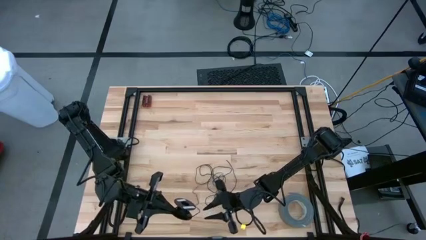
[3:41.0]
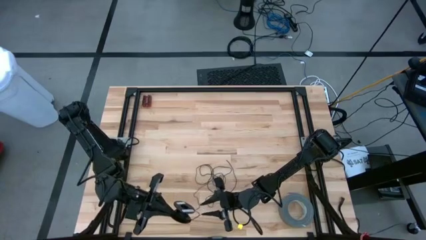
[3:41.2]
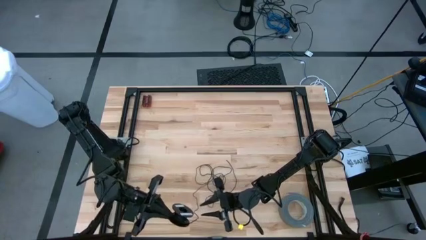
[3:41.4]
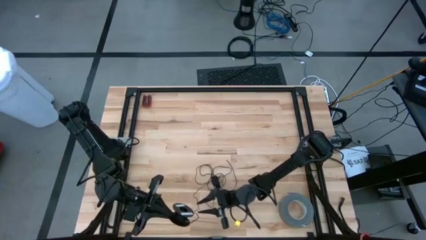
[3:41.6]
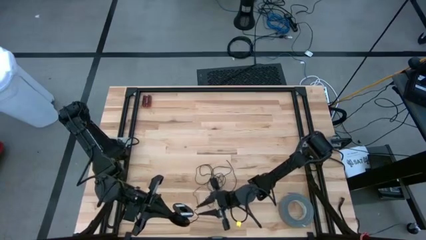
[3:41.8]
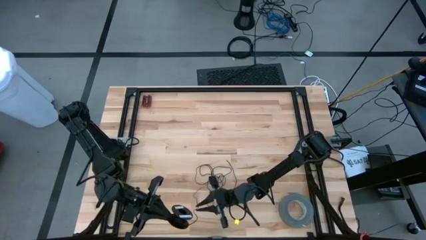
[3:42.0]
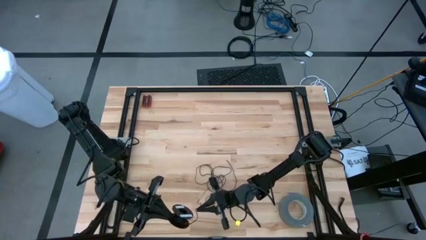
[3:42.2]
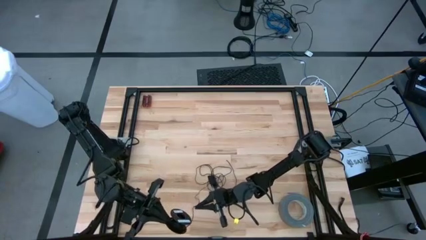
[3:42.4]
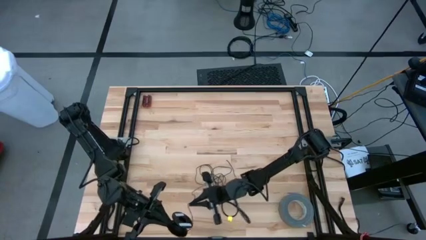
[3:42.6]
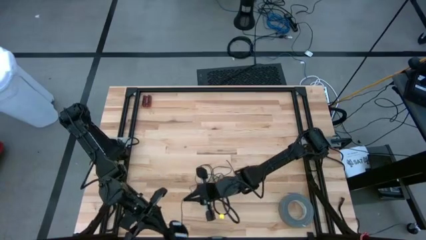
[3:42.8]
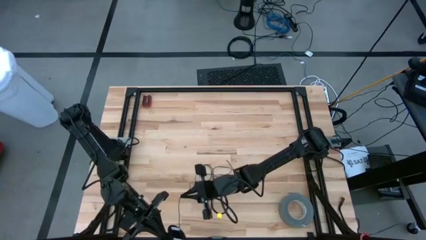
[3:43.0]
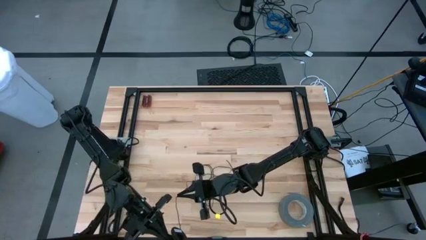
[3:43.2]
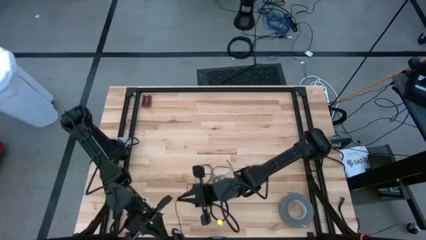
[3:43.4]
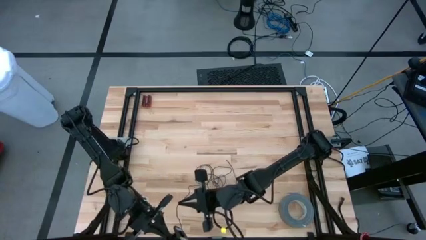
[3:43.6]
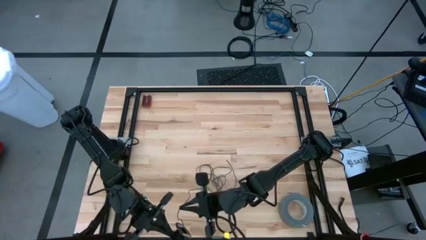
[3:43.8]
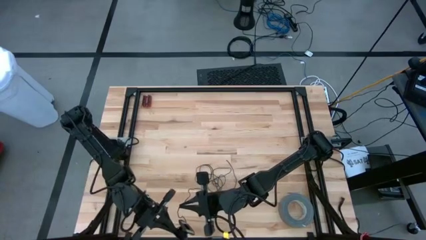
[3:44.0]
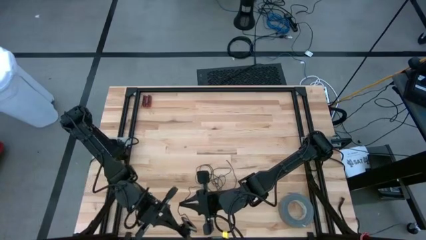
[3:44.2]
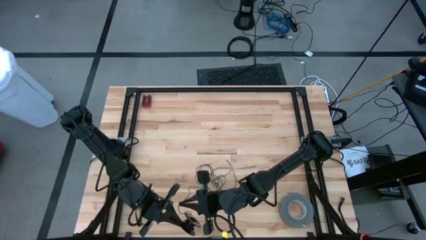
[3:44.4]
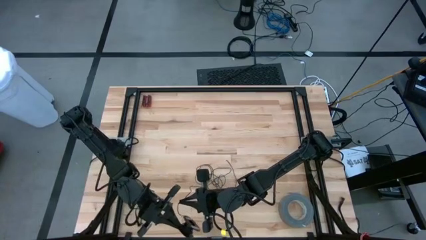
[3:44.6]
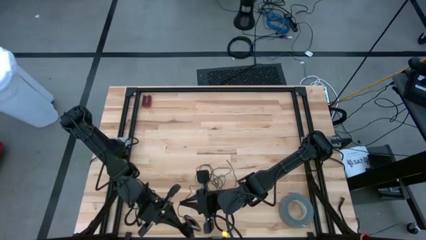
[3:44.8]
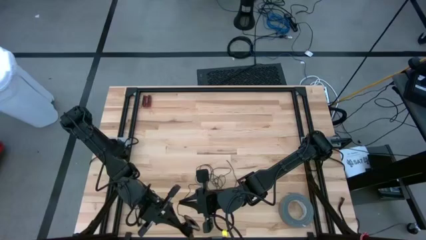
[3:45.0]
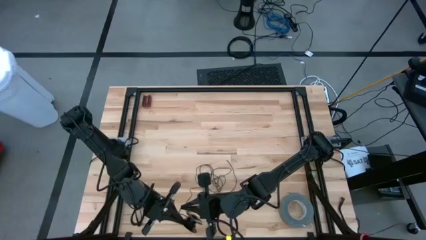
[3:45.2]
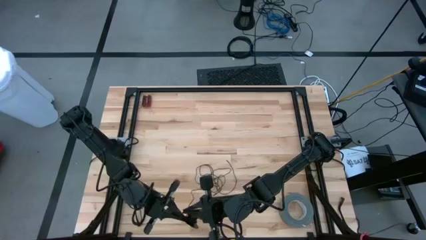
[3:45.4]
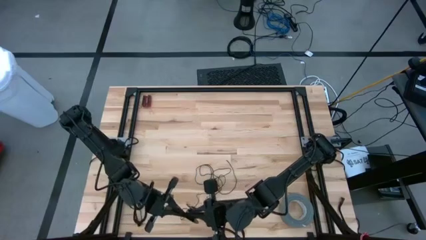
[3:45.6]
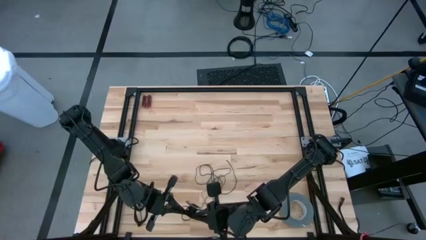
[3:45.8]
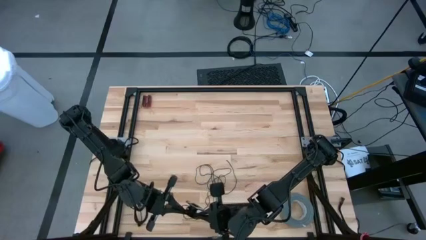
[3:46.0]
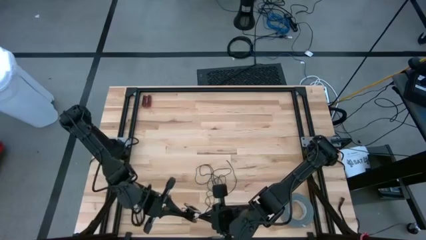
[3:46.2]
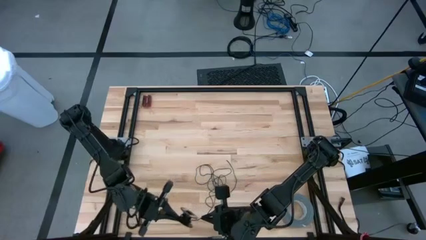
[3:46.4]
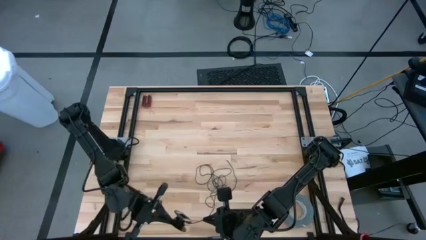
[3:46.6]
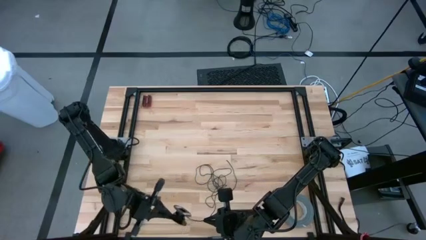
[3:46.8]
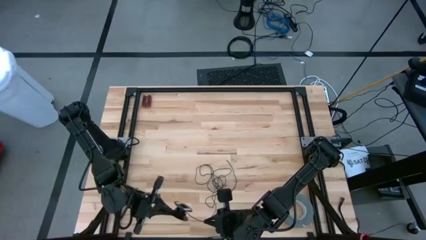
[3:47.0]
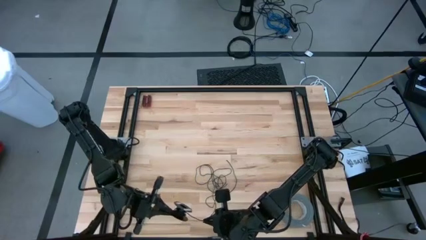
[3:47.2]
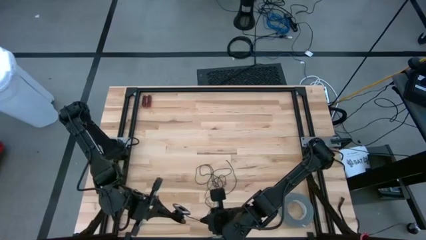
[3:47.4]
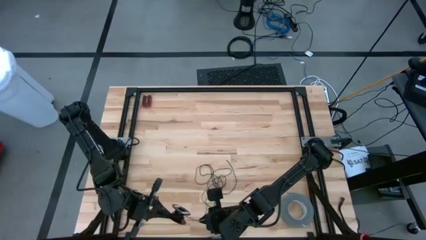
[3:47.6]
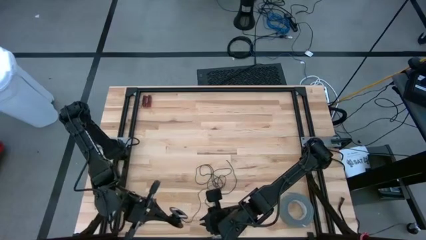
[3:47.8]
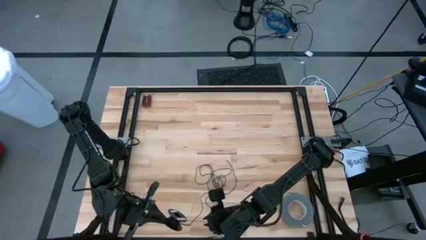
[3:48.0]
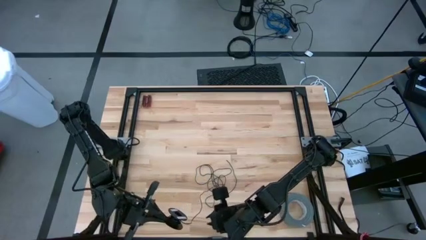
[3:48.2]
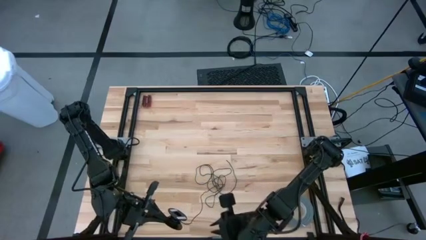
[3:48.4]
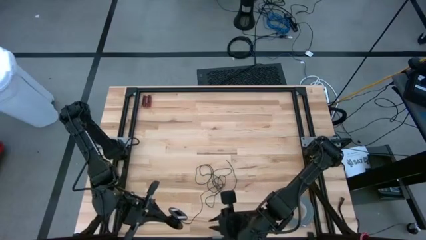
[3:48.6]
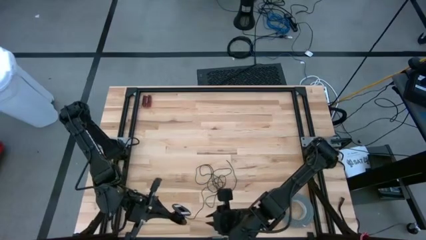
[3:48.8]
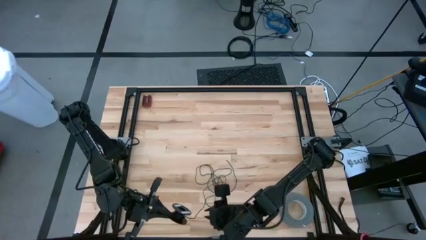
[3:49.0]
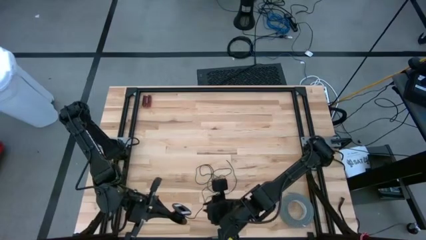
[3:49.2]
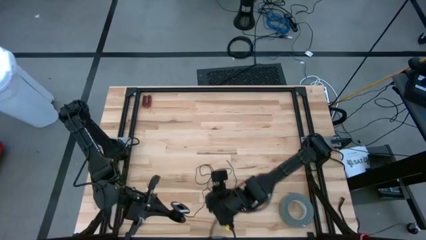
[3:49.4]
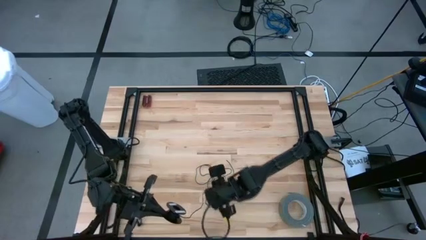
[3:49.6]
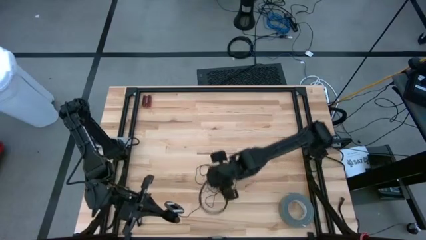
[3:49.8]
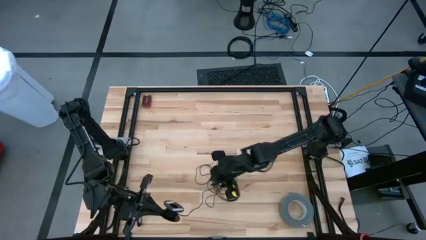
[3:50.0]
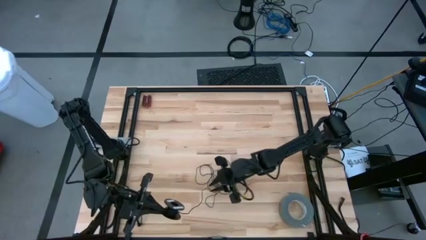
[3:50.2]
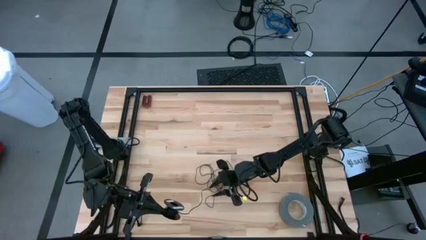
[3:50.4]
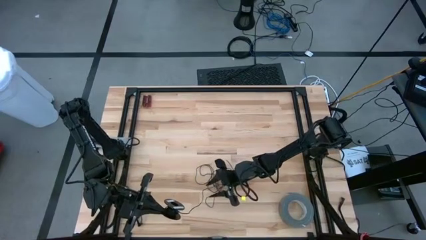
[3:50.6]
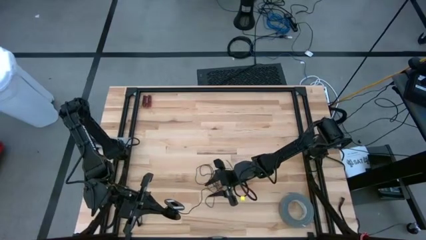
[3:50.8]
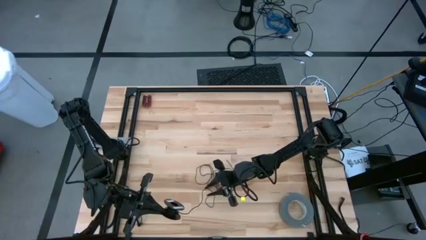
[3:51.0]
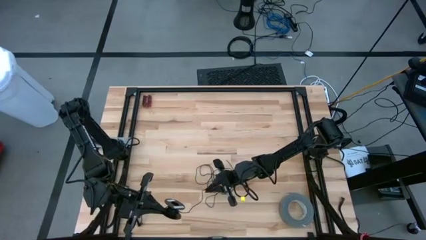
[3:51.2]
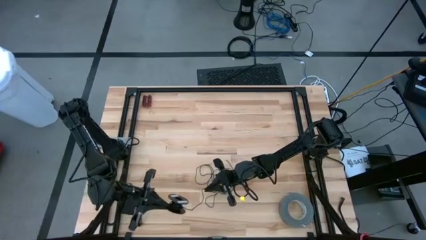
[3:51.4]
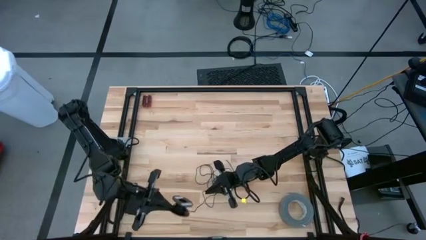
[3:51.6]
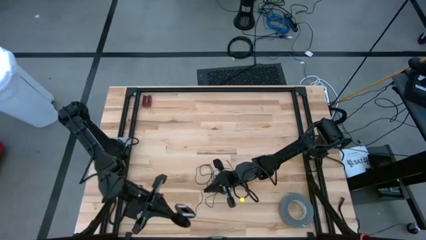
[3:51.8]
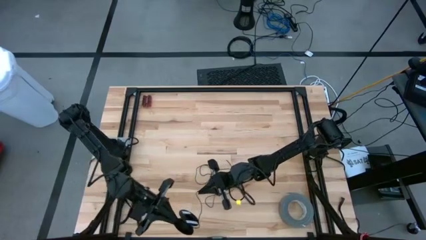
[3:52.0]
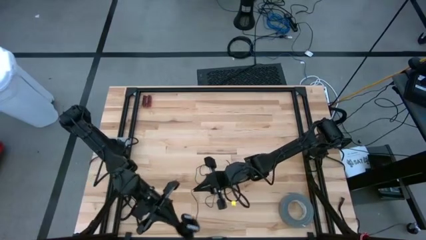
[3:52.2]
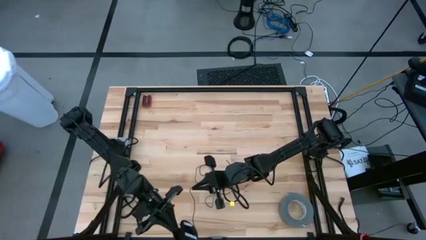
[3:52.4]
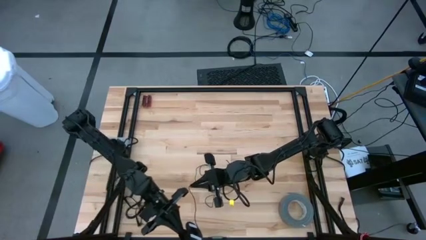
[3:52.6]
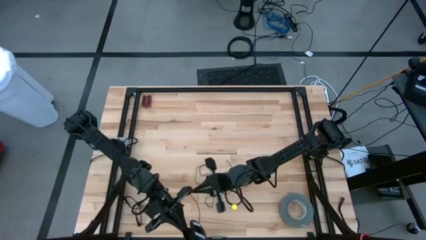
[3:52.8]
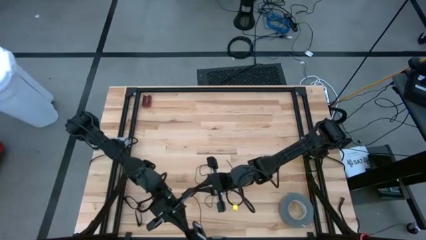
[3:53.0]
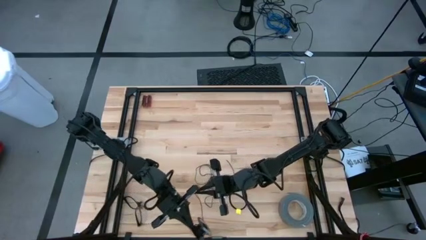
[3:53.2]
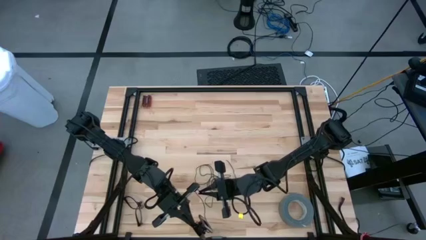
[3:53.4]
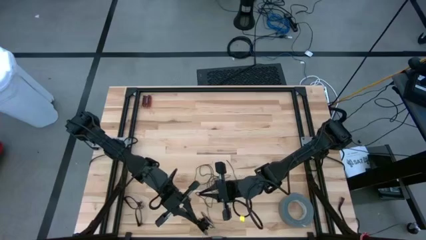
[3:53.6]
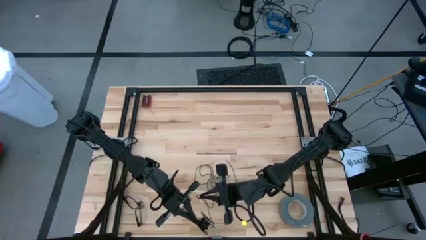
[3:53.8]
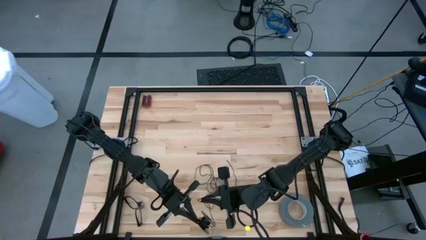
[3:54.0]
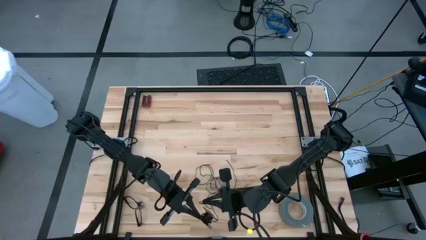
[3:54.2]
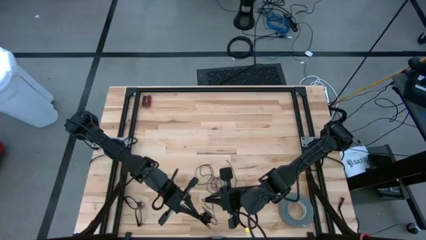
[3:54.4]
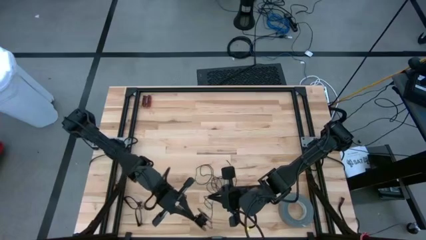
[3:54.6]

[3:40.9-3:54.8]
Task: Coil cords
Coil the black wire on the spool

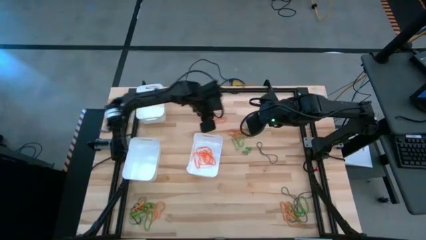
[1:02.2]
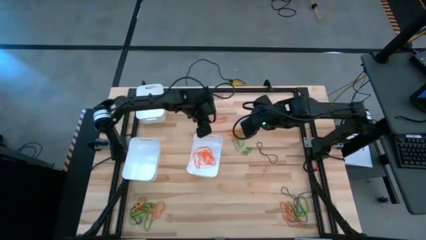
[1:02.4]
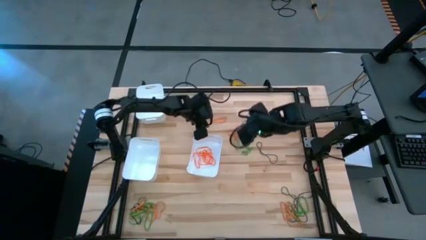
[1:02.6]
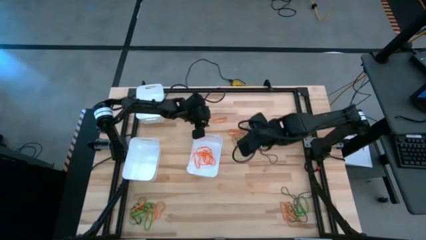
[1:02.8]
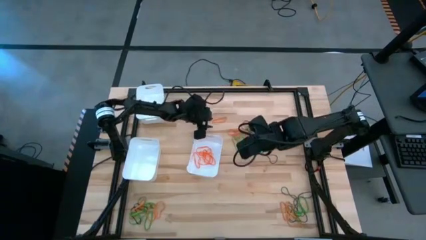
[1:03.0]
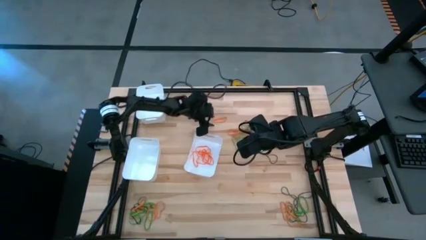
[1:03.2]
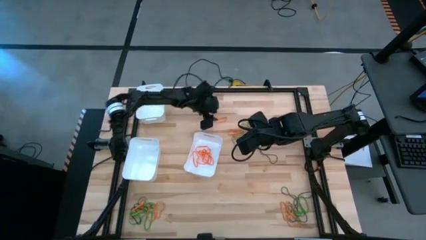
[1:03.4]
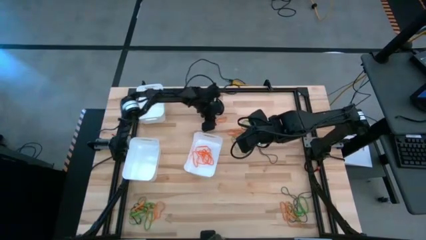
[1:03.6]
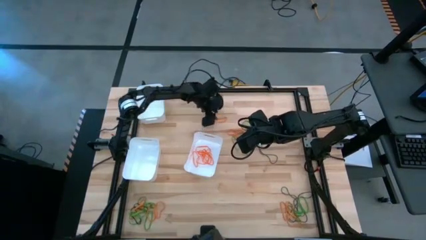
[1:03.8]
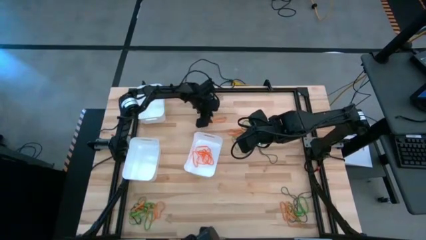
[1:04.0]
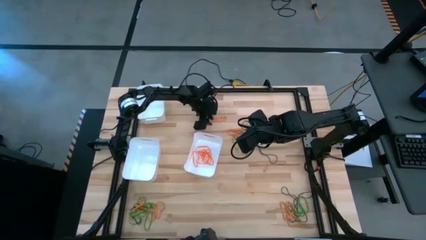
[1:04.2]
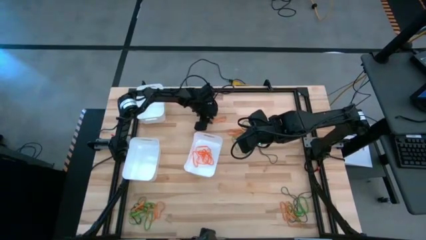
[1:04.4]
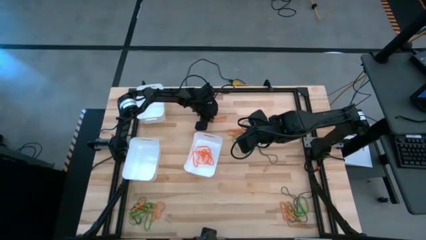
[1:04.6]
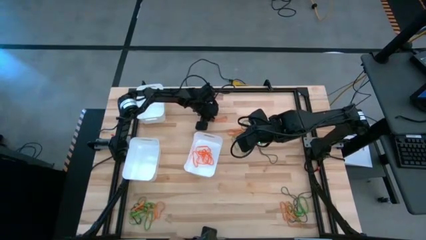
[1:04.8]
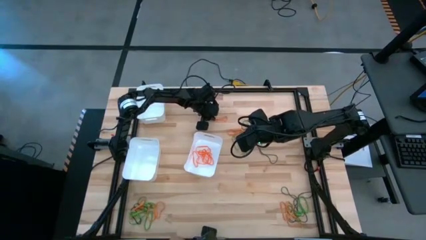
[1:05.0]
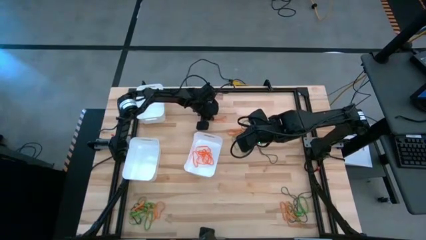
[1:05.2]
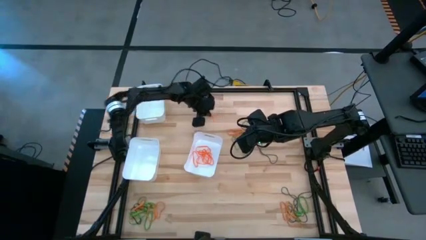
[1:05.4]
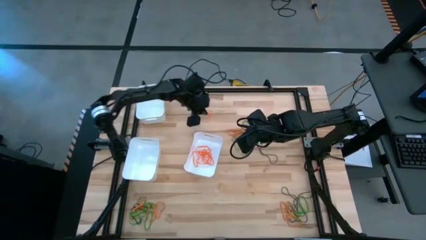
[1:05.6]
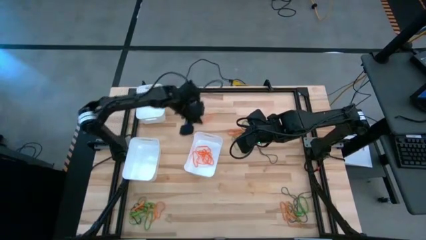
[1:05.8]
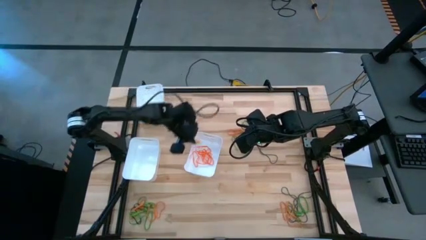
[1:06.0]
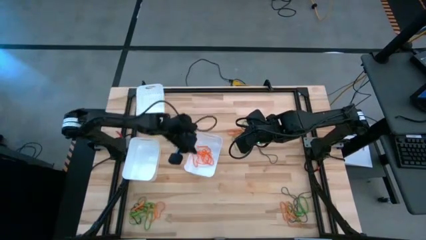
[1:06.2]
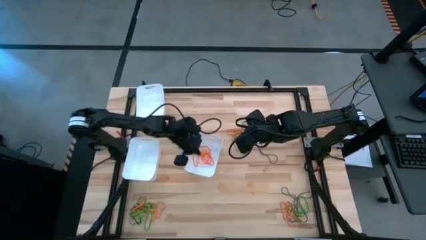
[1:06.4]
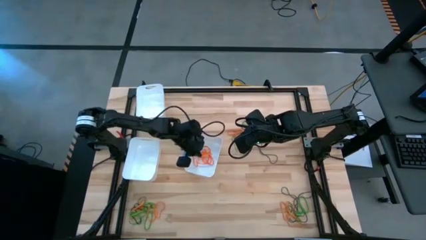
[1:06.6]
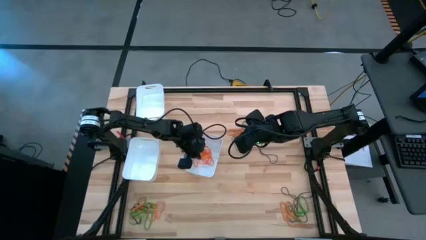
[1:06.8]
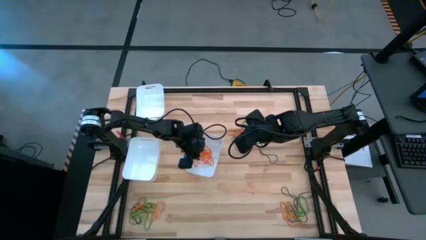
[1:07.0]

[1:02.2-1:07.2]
Task: Sort rubber bands into baskets
Put the orange rubber band into the bottom right white bin
